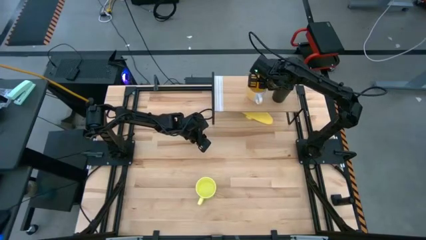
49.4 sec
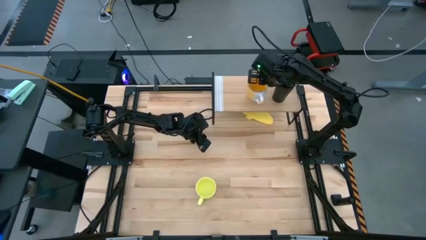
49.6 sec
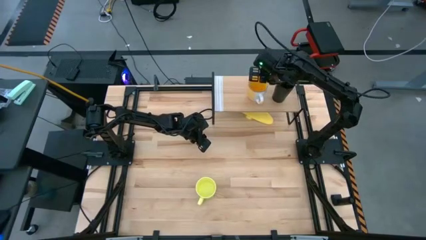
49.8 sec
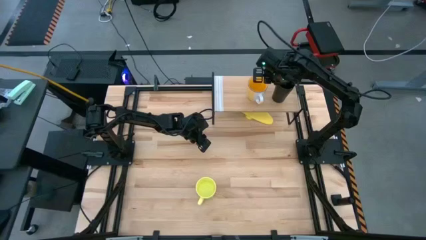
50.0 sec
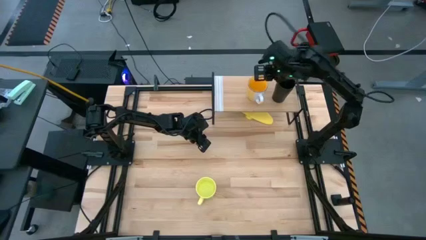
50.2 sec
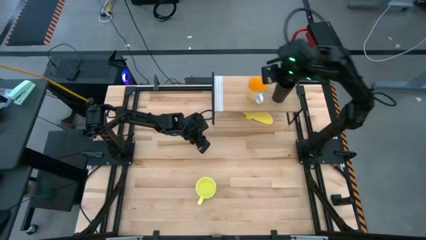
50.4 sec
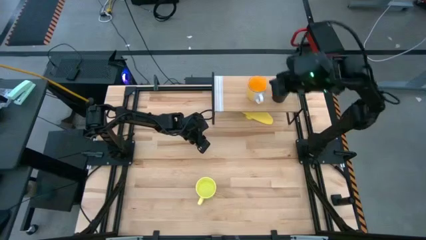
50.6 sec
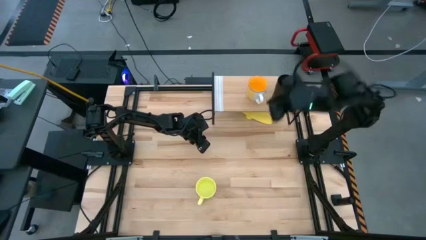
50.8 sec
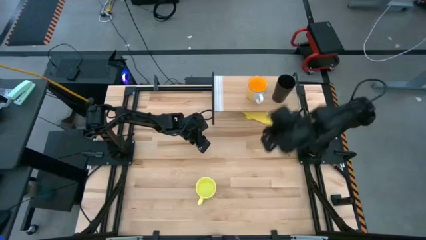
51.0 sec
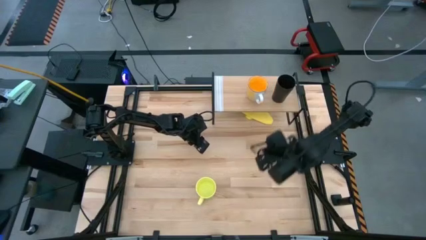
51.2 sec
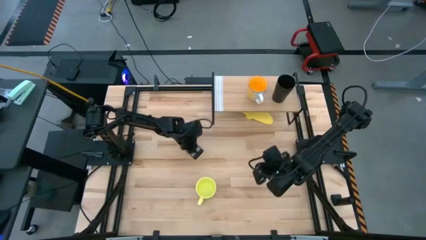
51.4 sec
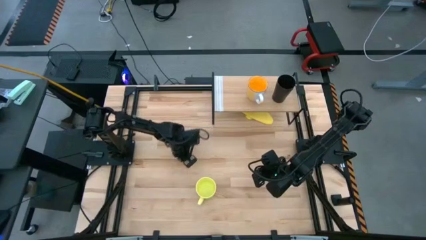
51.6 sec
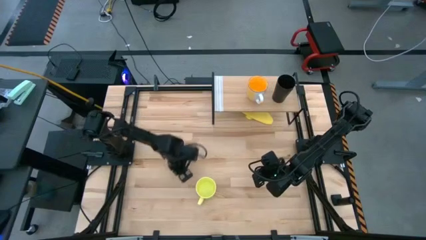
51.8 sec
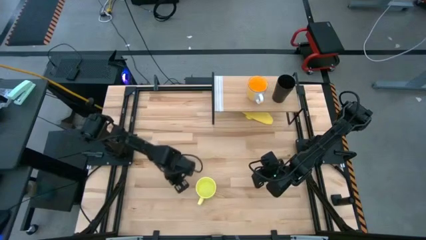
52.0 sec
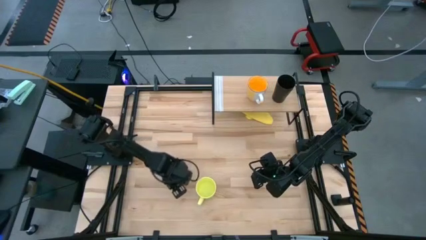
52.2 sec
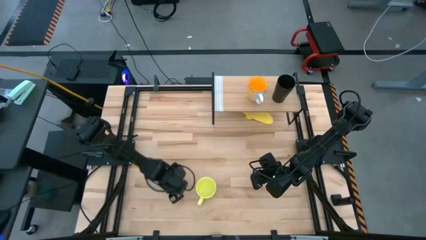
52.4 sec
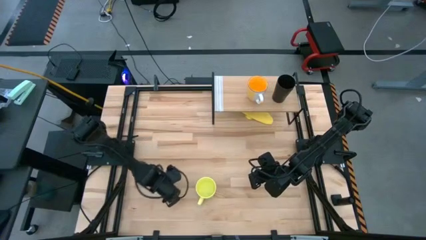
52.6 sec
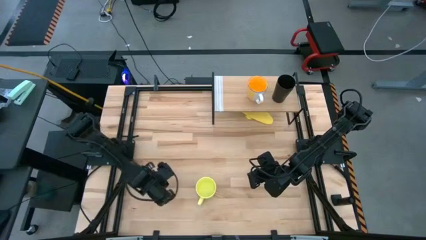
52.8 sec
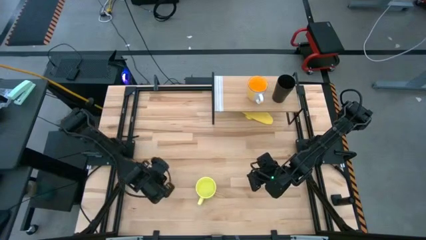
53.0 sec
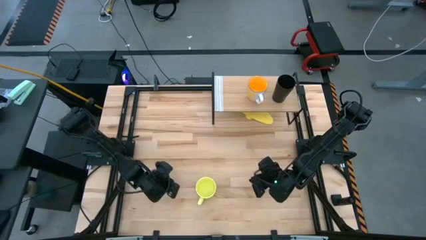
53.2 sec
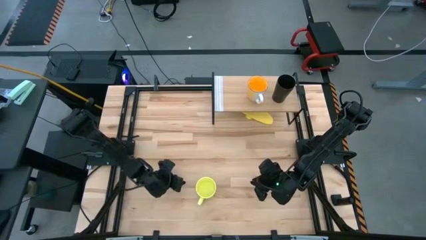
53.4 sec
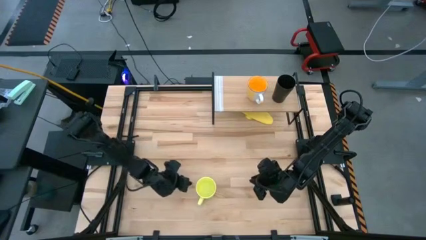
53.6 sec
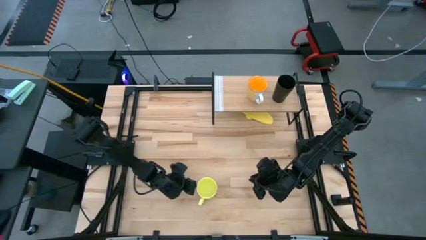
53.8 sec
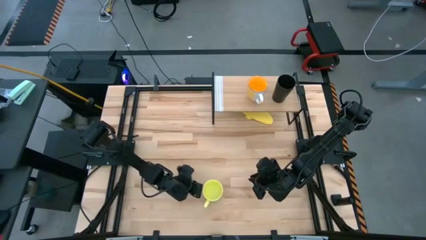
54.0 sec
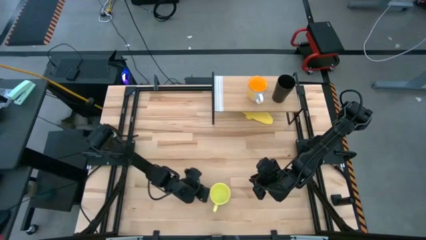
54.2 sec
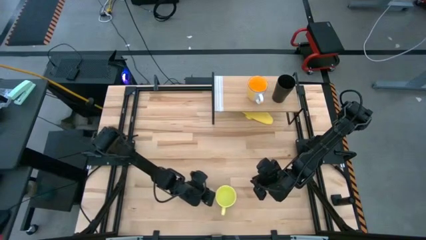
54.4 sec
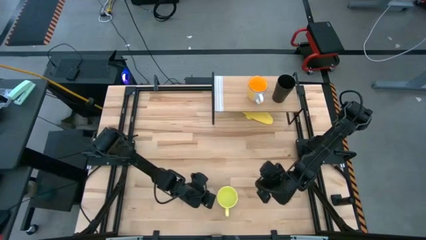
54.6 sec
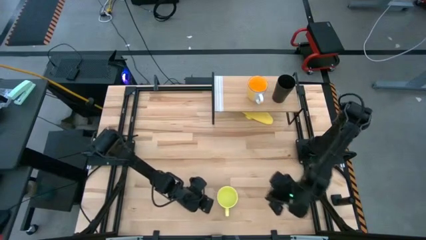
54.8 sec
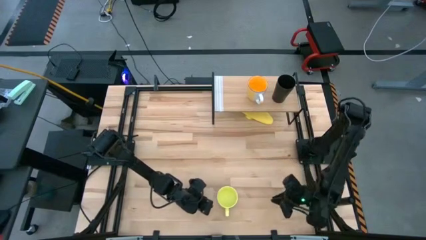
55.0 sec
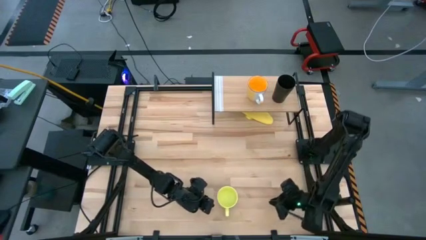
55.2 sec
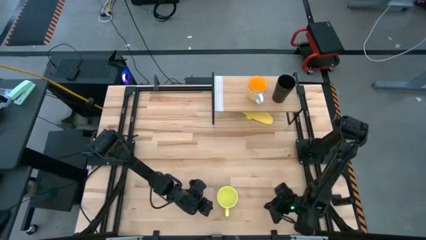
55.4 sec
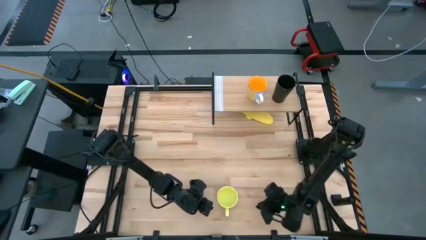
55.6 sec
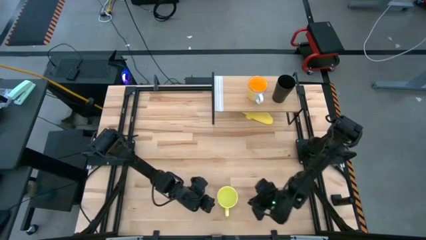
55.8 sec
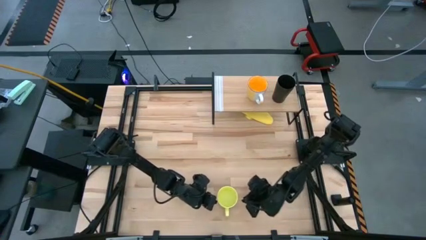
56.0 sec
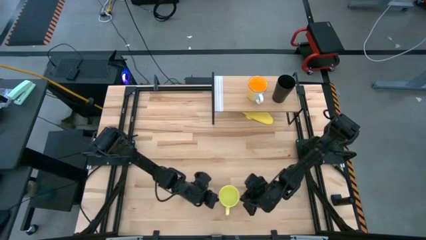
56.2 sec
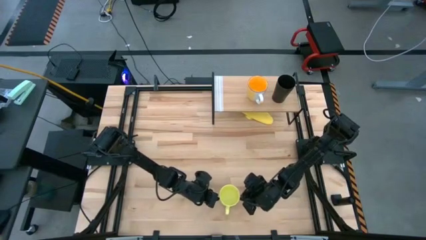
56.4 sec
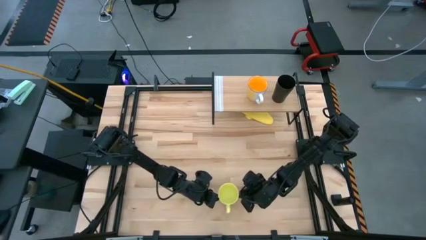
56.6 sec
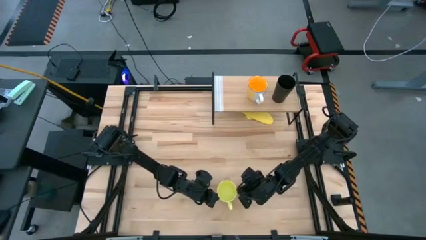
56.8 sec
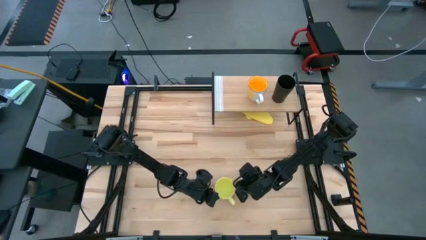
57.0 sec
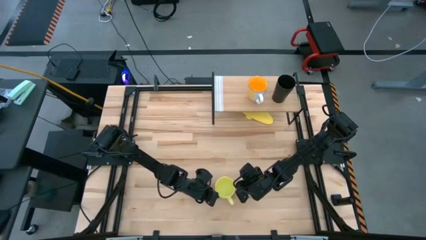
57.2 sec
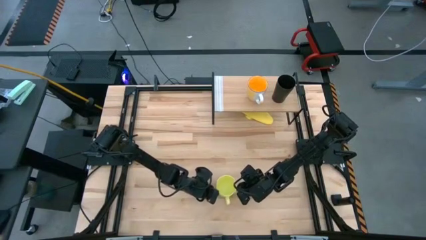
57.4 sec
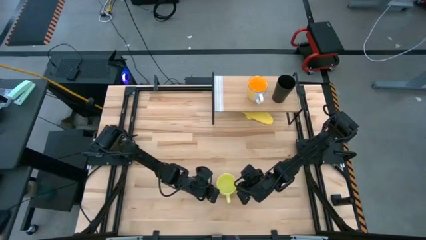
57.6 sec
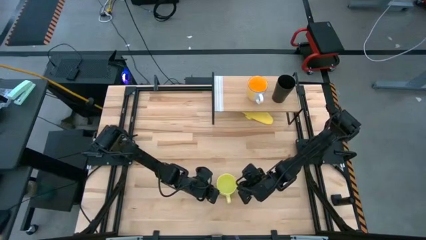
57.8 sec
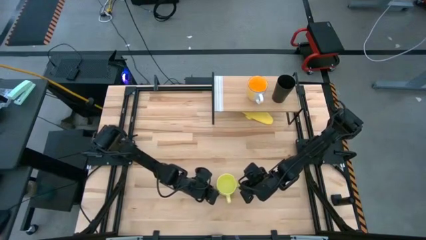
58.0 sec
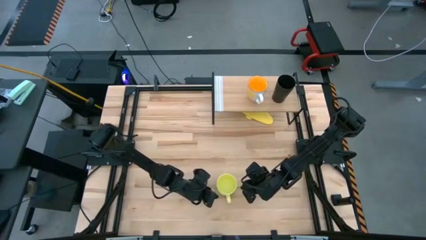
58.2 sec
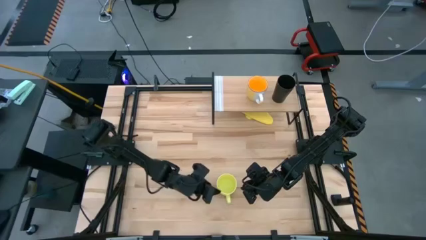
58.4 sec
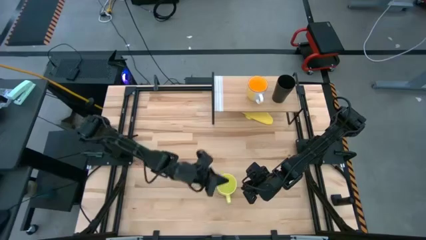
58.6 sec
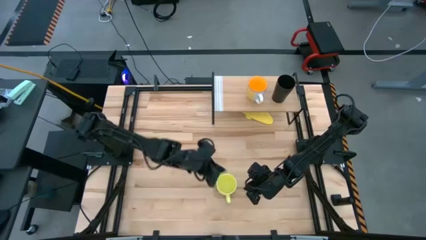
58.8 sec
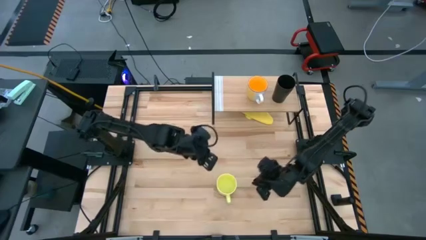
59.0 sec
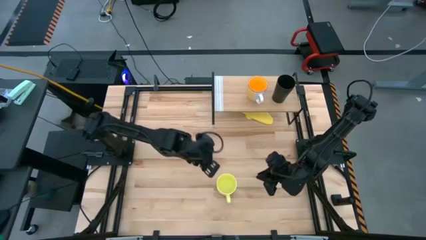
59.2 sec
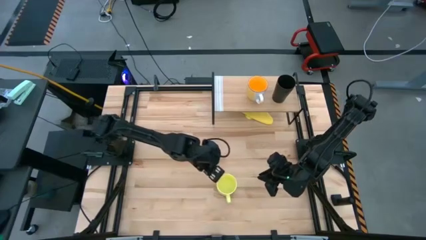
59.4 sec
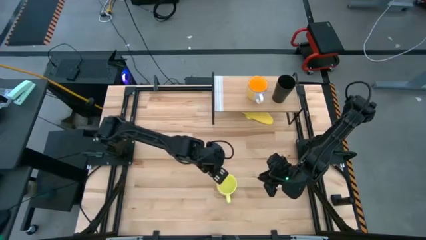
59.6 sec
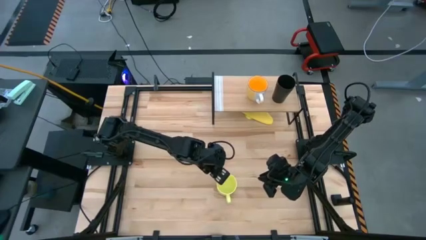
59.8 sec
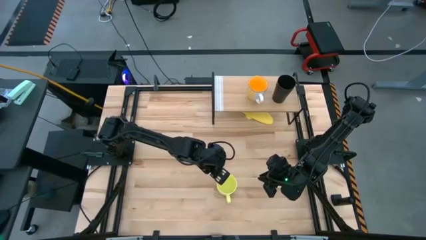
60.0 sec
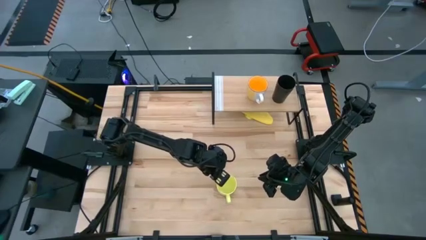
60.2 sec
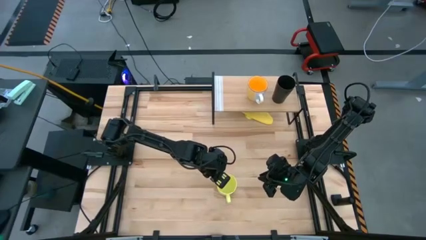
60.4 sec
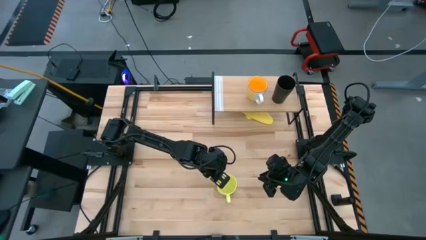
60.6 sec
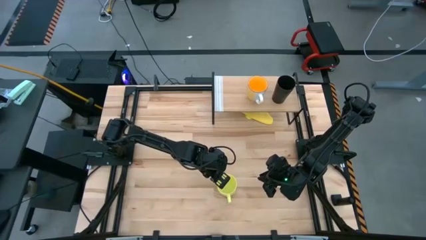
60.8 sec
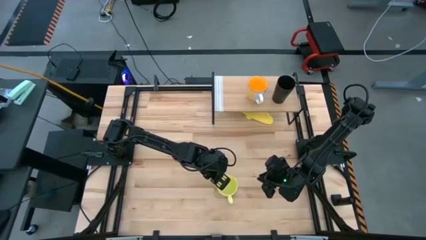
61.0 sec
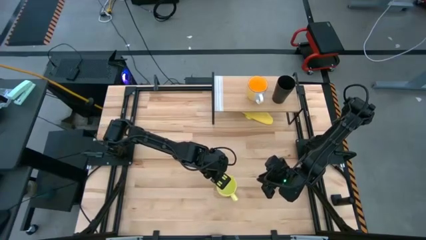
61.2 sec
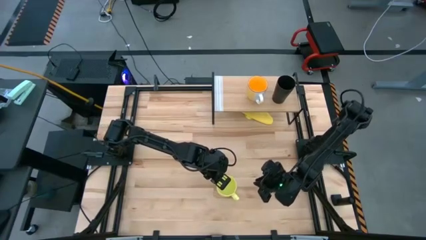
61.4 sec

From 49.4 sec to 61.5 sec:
Task: Stack small to large cups/mugs on shelf
Put the yellow mug on the shelf

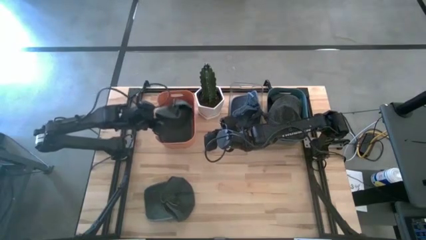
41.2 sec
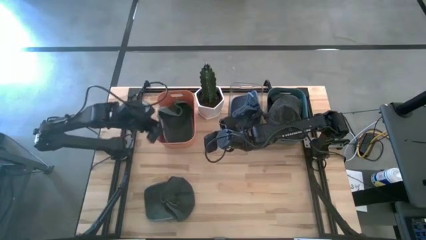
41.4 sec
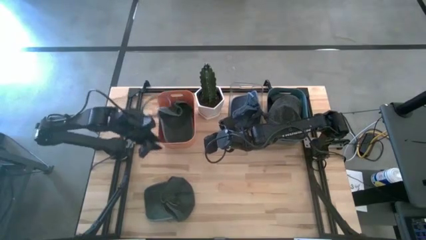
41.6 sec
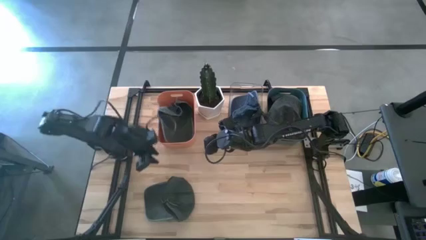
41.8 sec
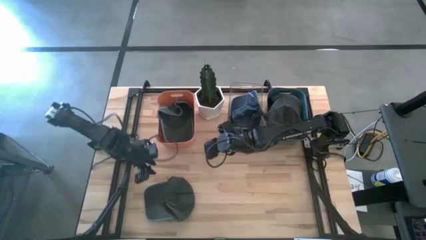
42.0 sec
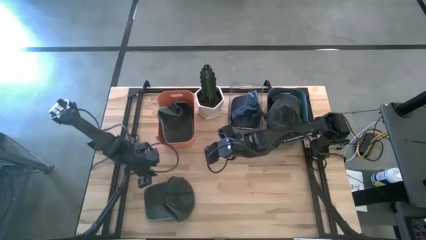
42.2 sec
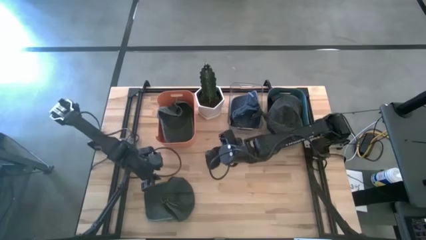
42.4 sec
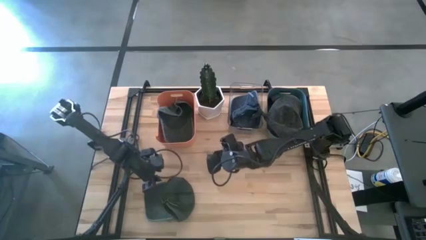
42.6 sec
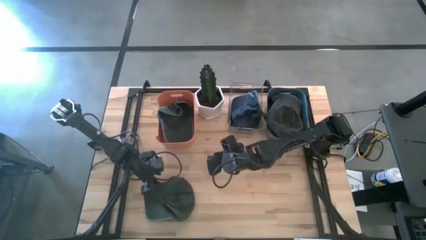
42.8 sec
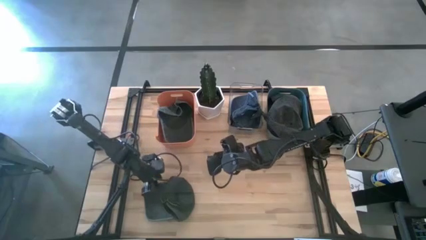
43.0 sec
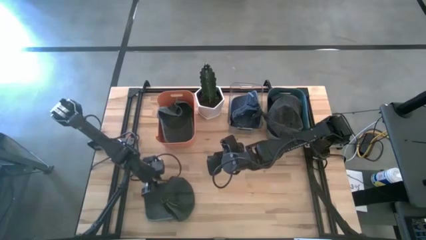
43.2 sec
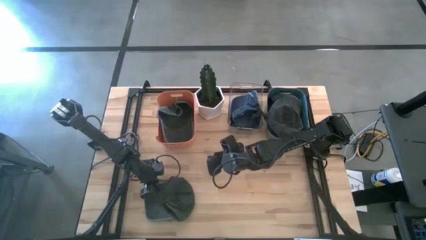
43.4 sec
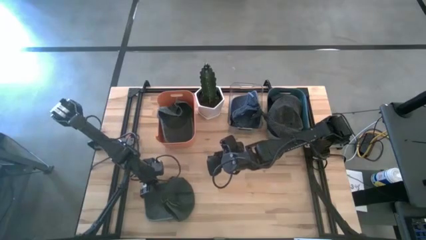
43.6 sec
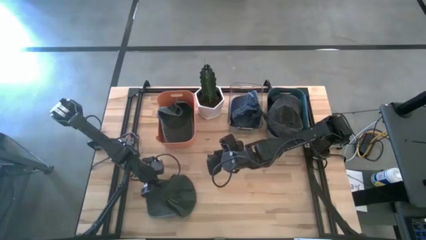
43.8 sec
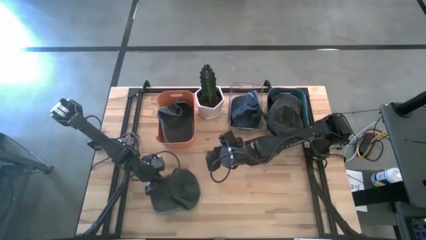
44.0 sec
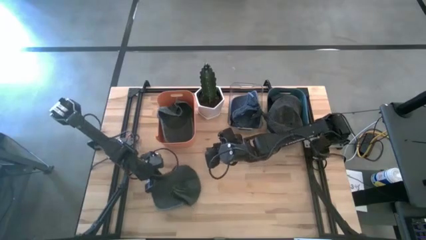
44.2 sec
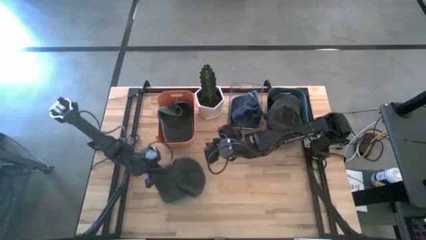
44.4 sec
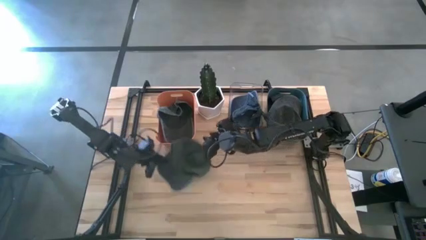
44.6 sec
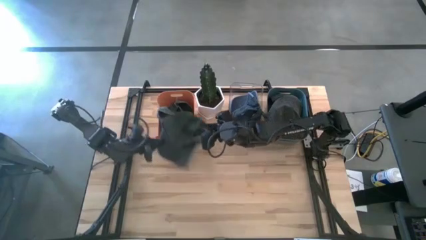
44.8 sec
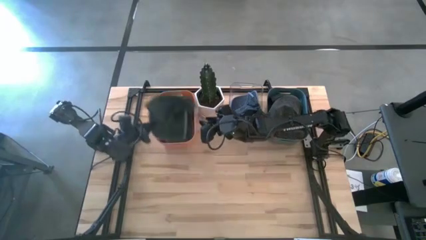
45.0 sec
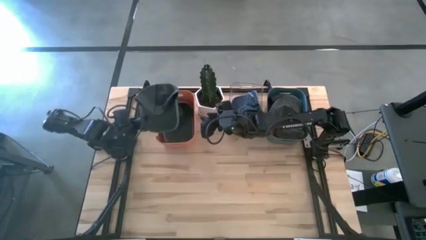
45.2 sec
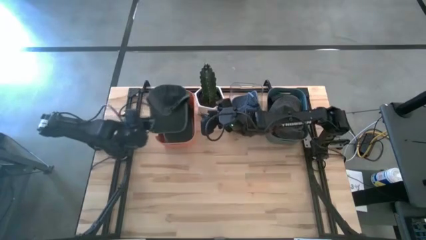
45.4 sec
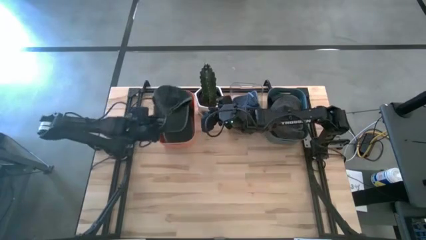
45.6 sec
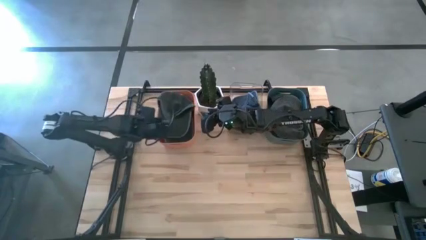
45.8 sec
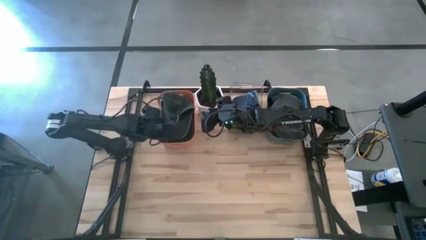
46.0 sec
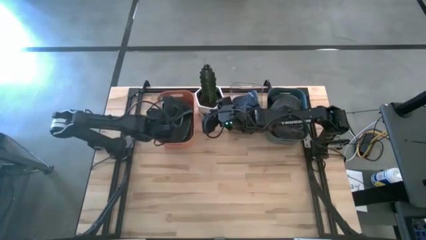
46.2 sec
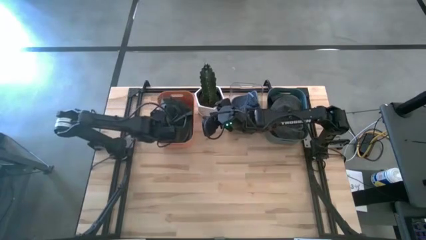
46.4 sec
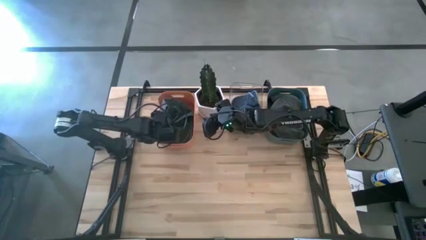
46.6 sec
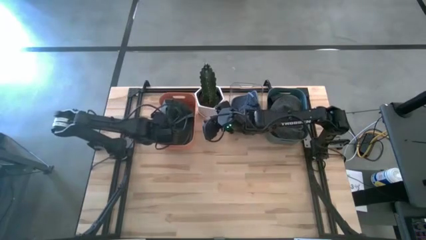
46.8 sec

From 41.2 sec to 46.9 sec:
Task: Pick & Place hat
Put the black cap into the orange bin
